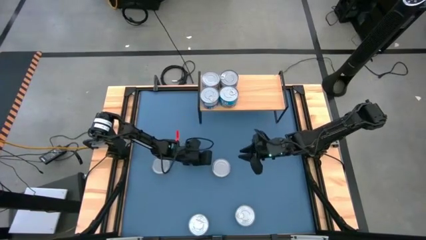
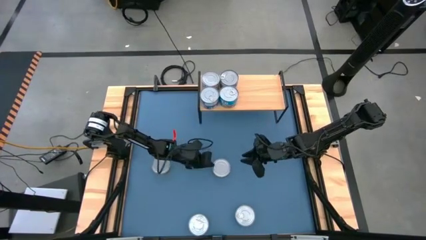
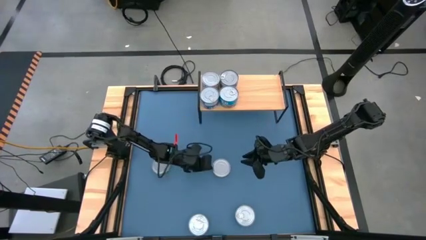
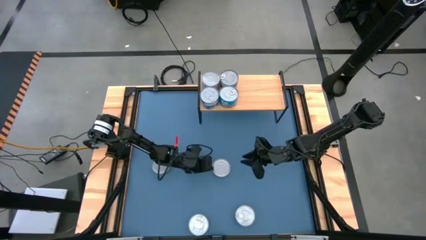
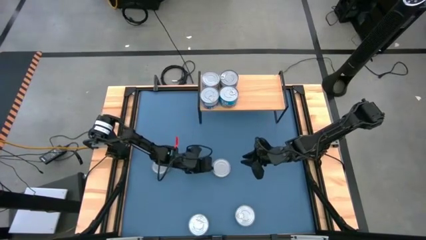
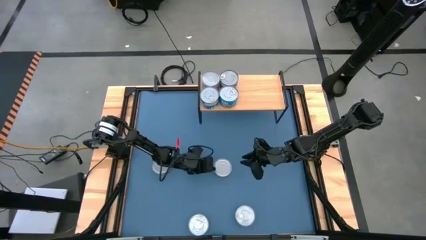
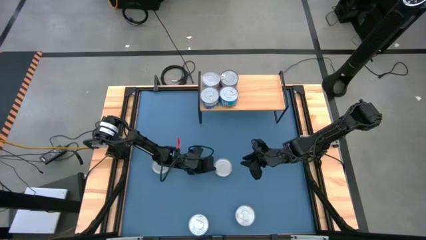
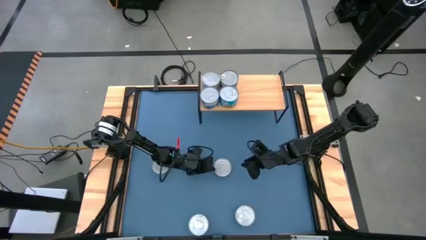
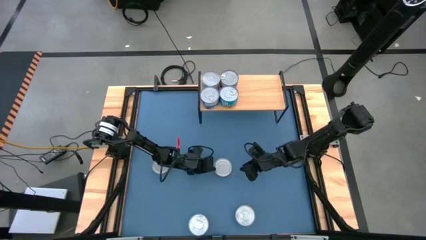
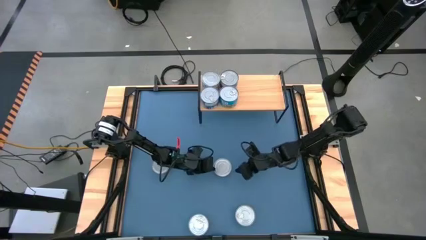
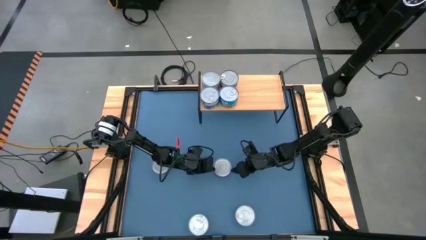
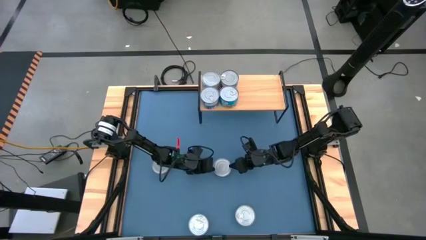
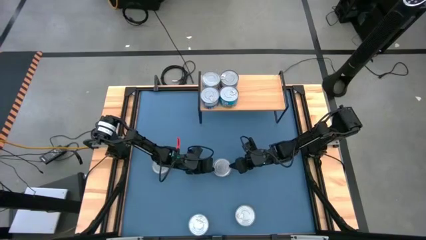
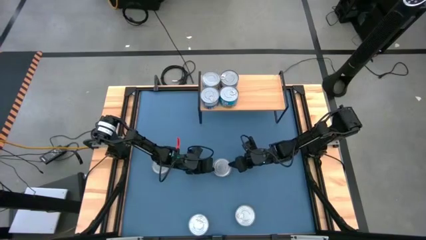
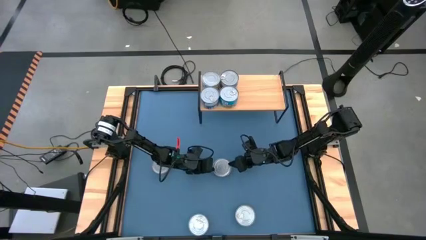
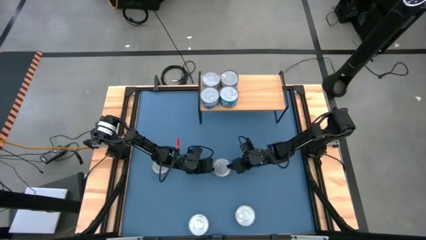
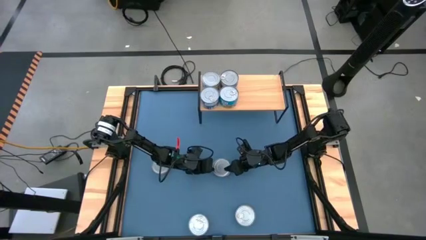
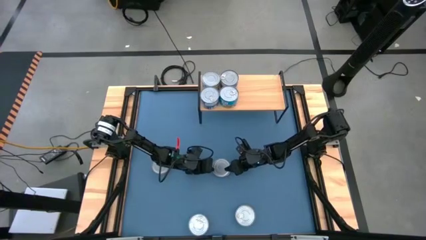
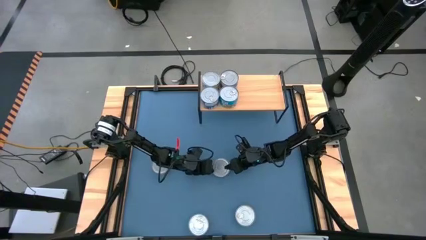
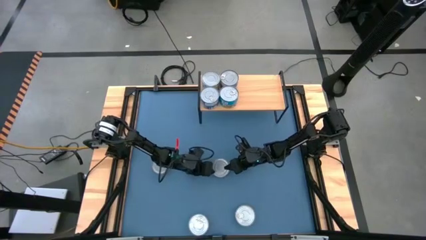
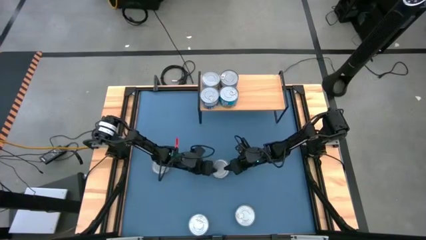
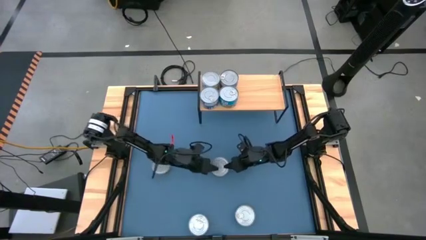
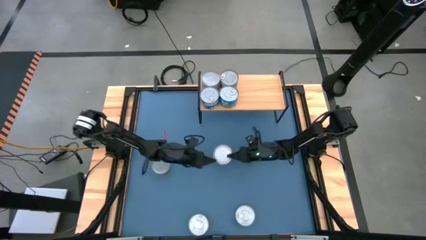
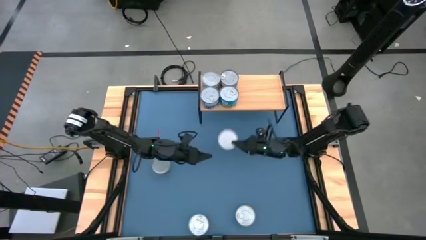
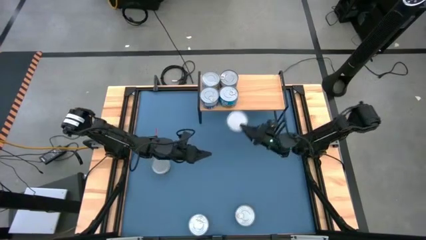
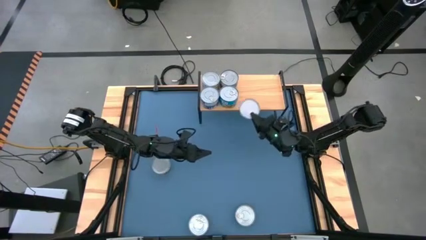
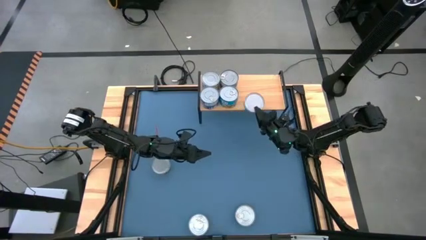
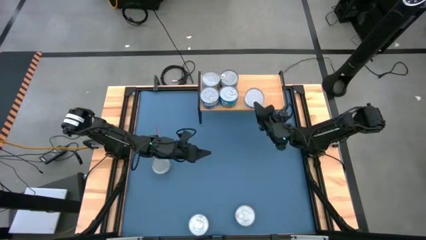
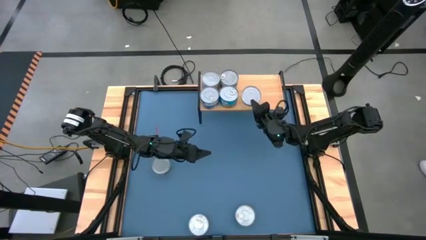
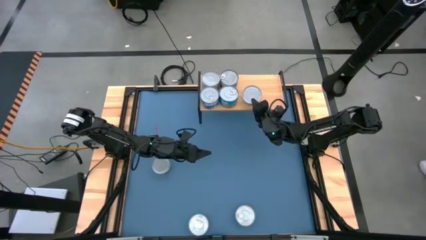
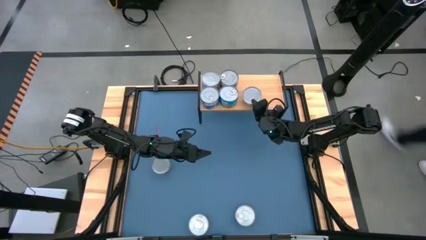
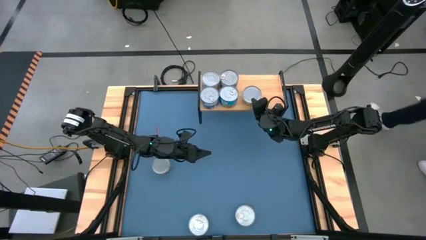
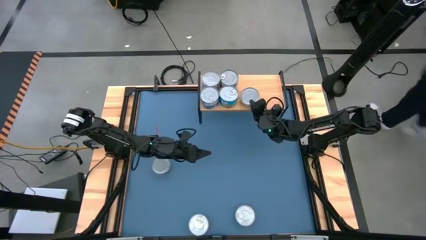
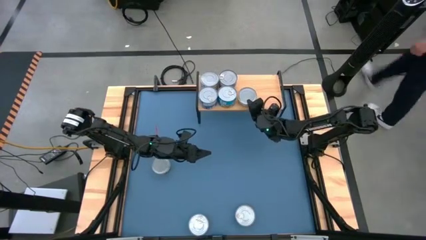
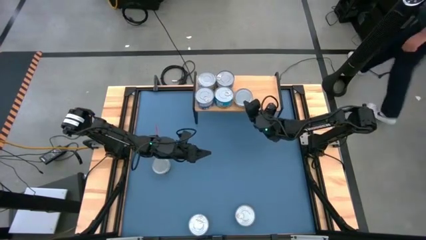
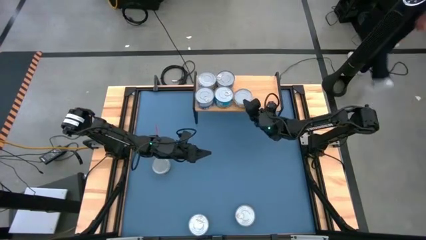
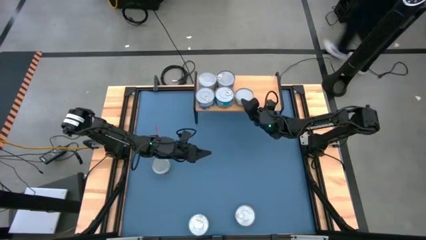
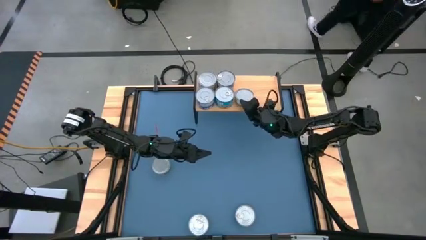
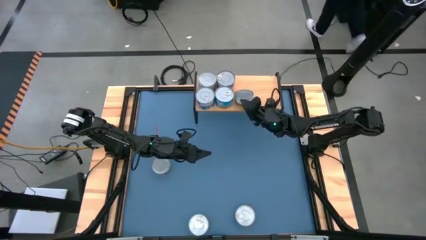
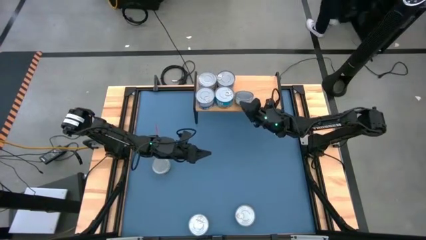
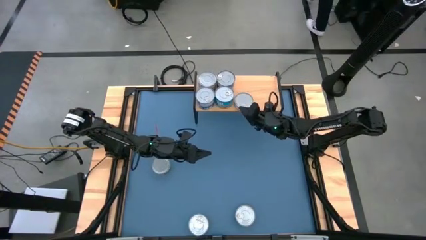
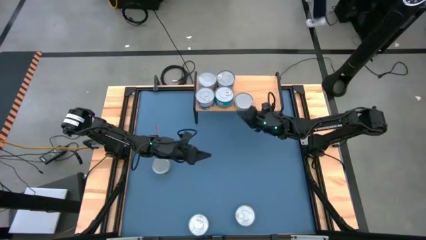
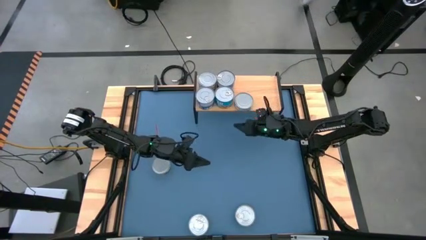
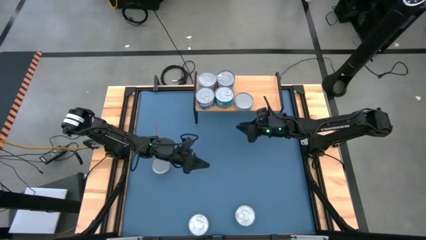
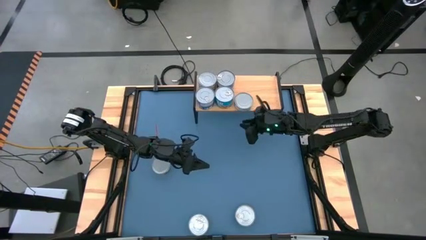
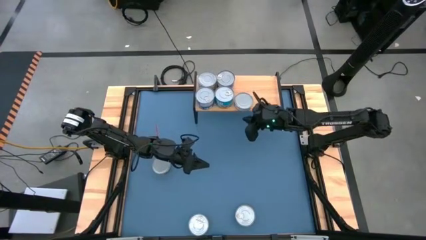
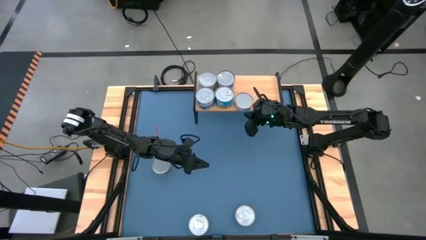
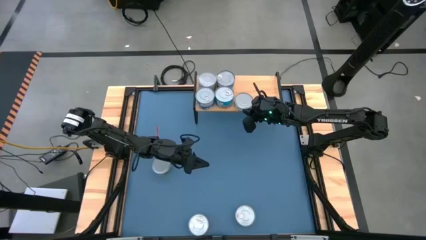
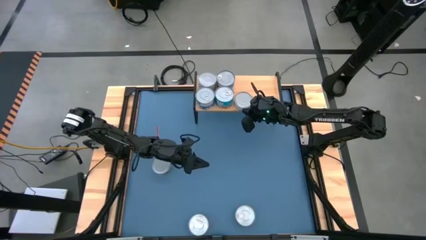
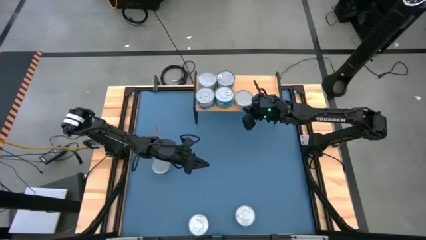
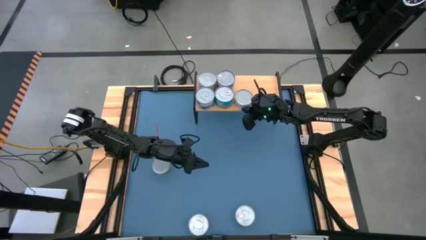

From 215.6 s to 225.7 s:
Task: Stack canned seafood by type on shelf
Put the green tuna on the shelf

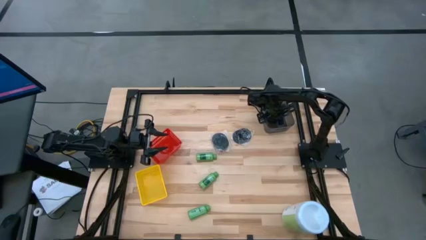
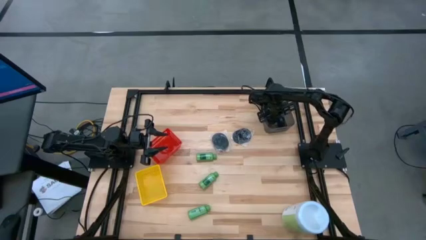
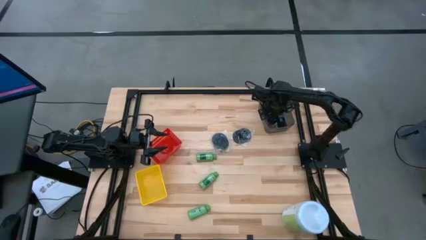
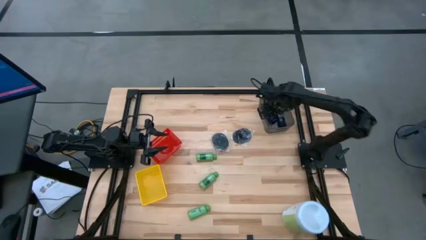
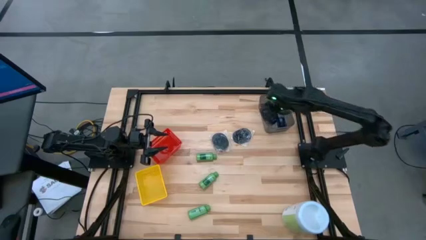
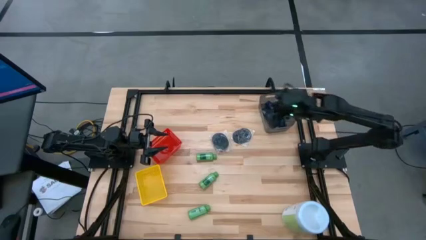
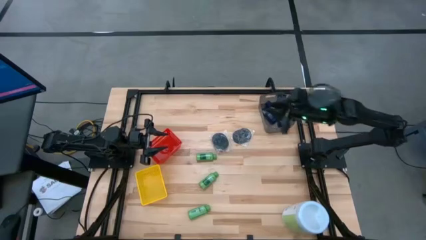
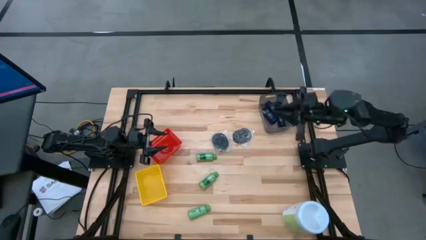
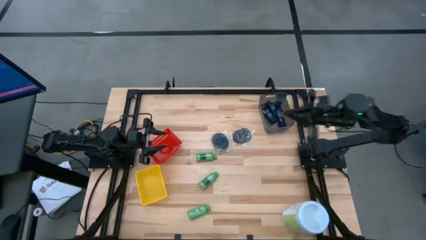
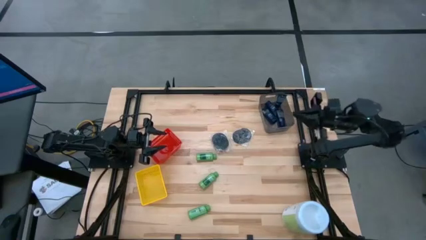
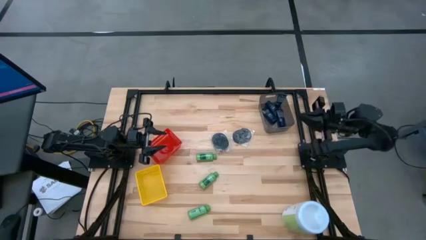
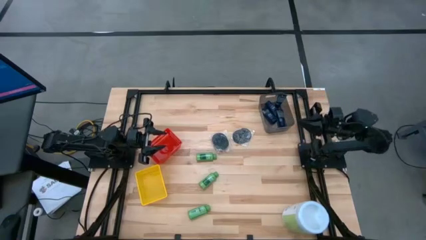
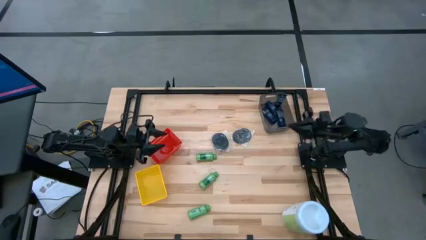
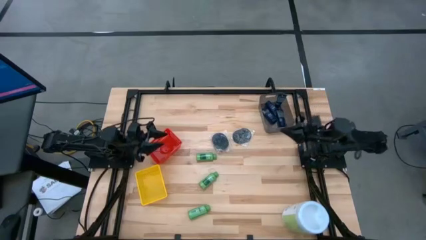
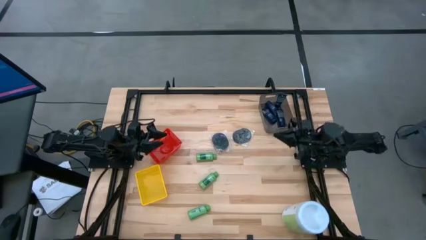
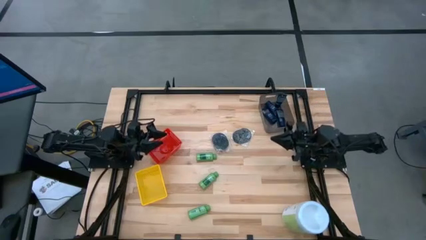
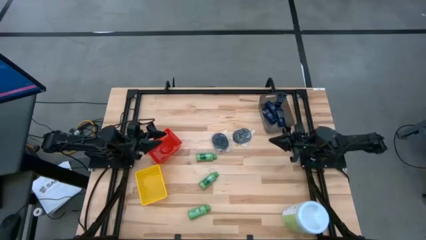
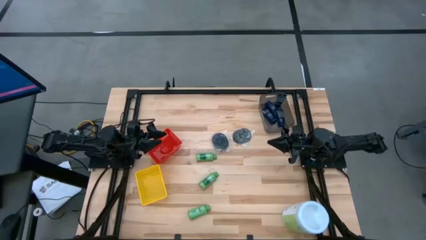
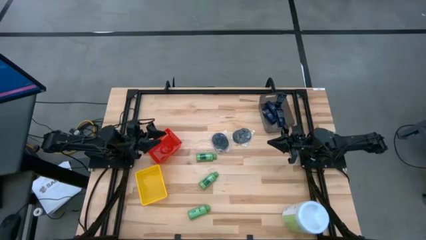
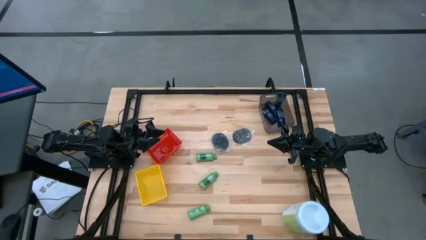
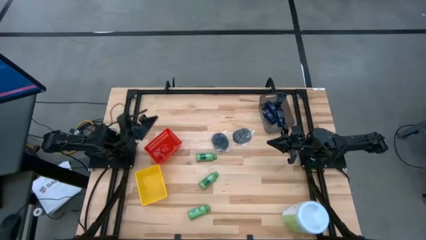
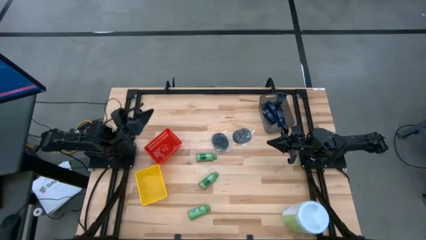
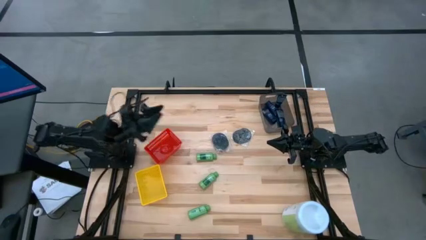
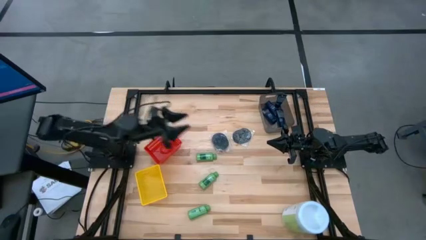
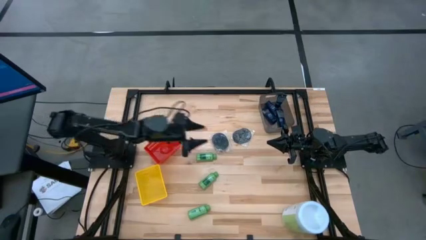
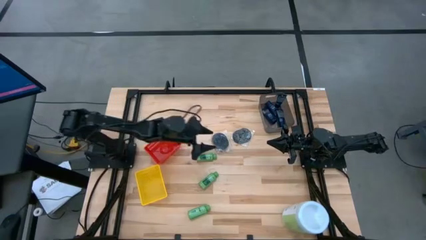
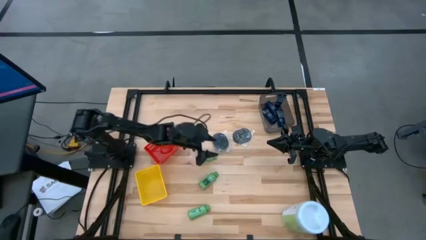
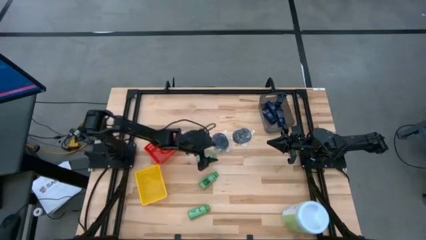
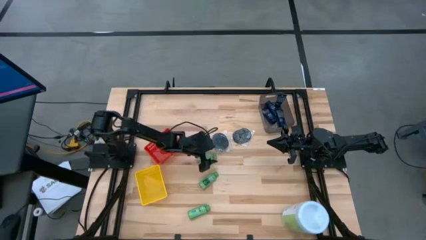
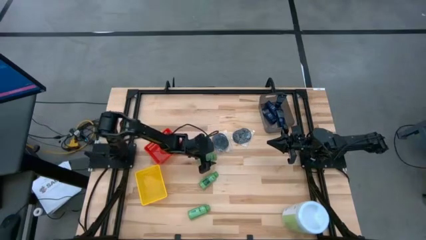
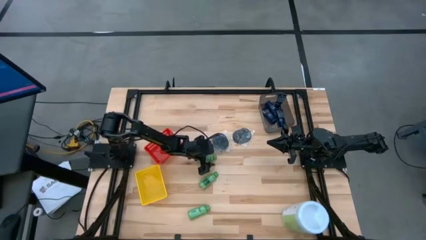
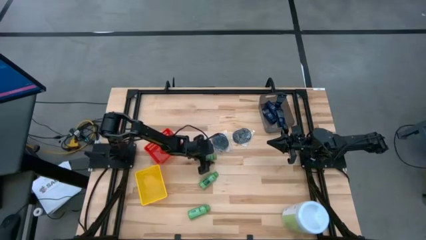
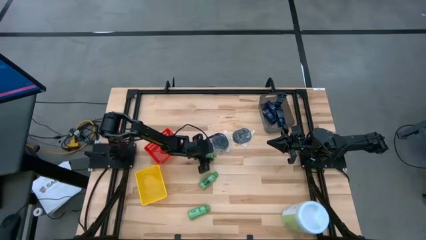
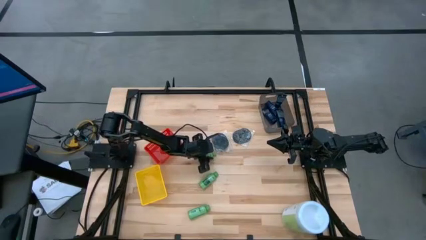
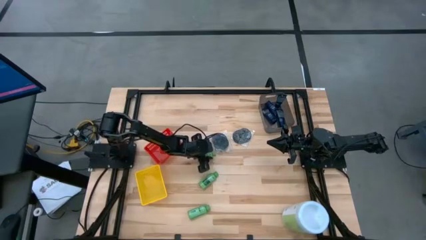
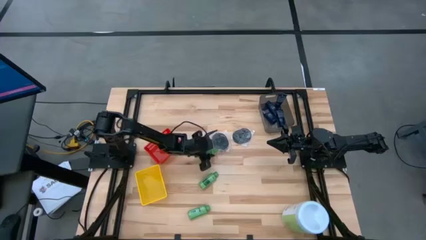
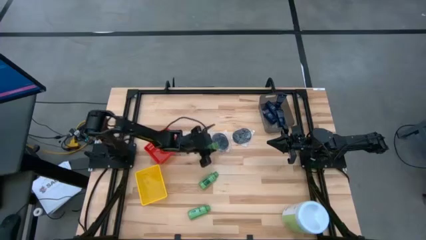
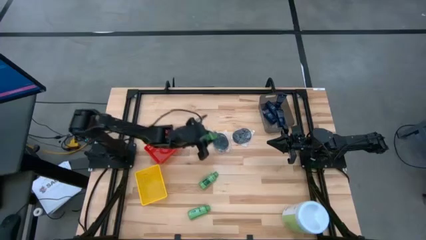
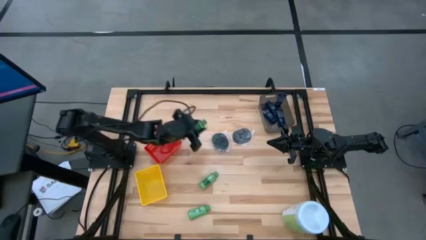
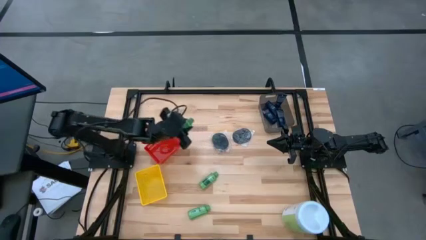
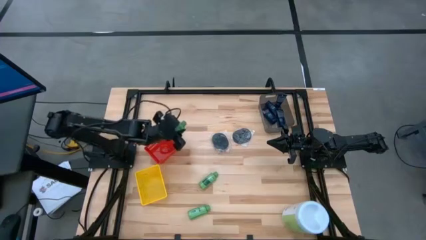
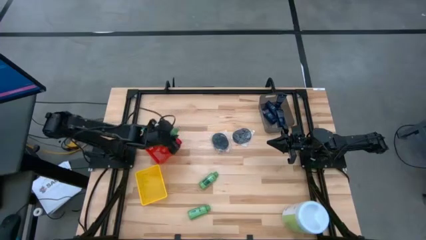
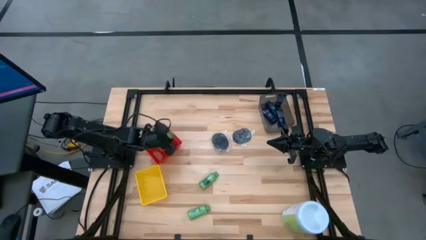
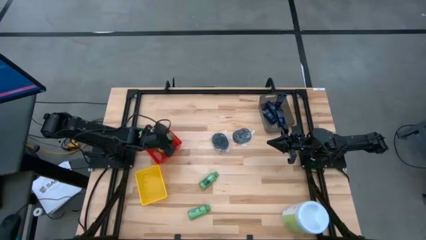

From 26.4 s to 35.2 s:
Task: Pick & Place Travel size toiletries
Put the top bottle of shampoo into the red bin
